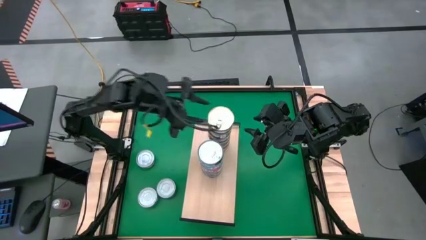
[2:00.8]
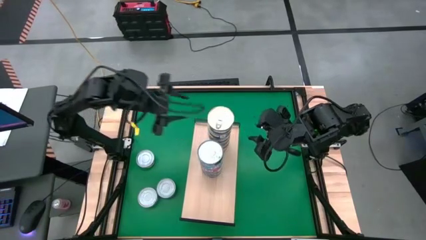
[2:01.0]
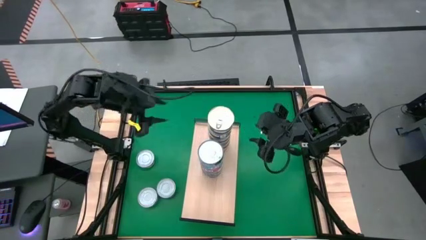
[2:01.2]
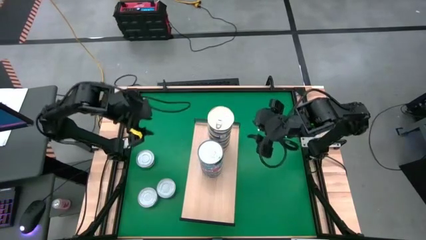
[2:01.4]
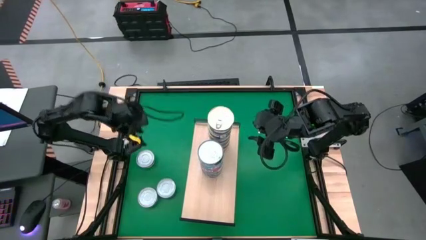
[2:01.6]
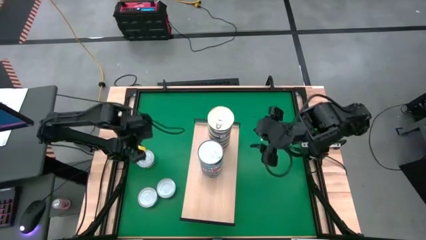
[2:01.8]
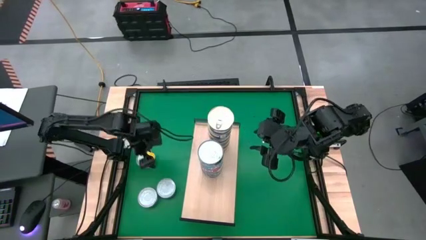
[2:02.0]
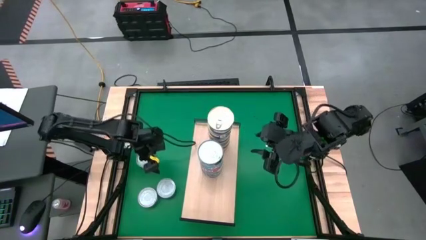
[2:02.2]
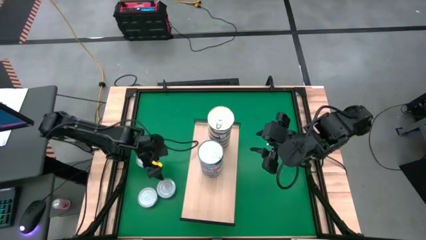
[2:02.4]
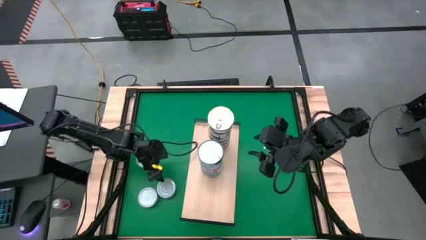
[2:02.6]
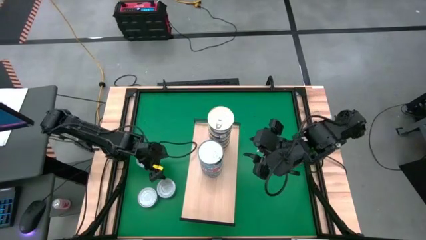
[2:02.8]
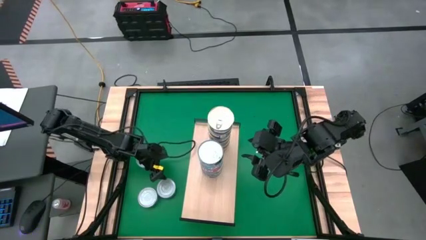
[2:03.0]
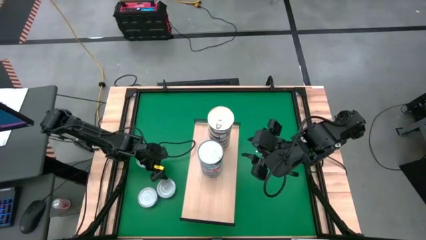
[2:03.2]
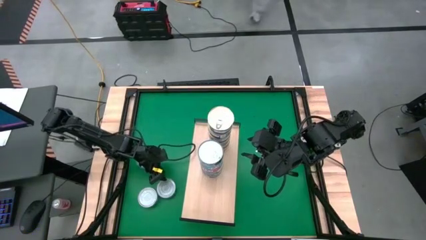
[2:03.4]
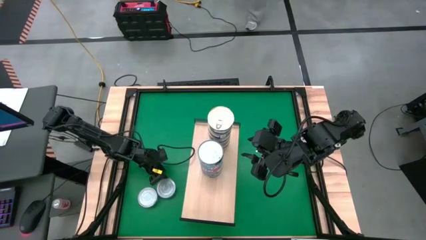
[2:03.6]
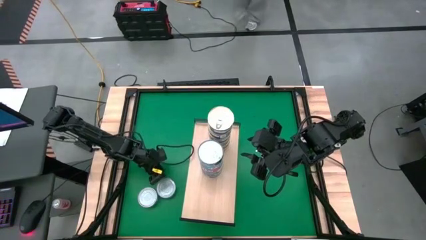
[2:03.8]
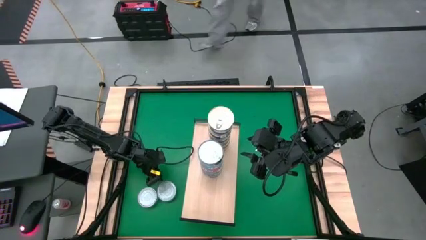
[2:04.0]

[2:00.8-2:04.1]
Task: Stack canned seafood by type on shelf
Put the green white tuna can on the shelf

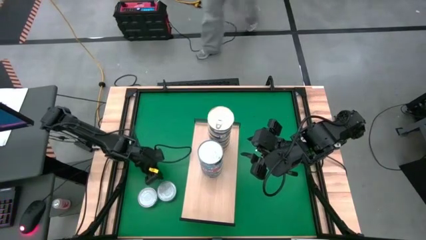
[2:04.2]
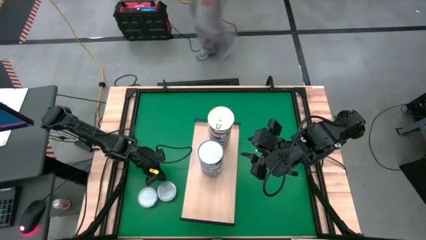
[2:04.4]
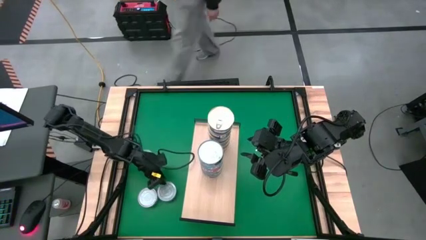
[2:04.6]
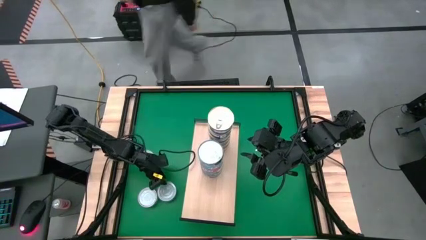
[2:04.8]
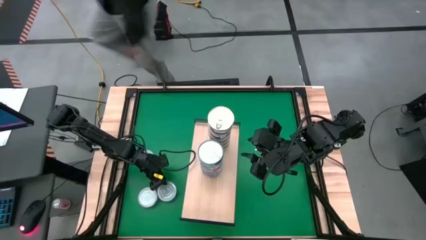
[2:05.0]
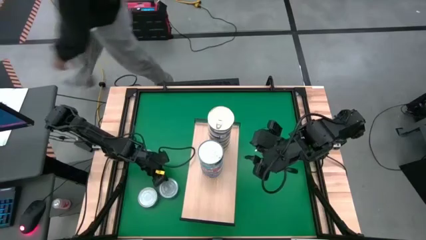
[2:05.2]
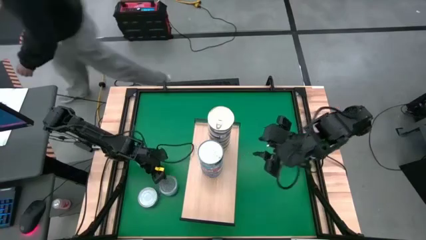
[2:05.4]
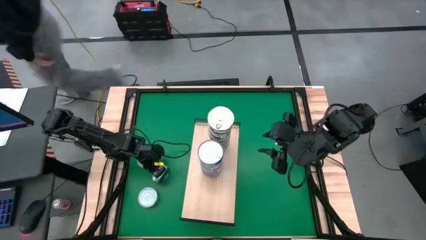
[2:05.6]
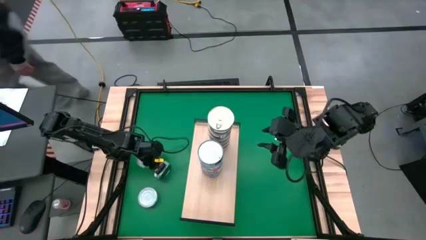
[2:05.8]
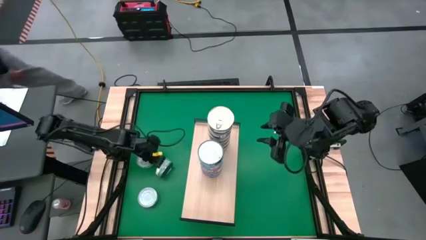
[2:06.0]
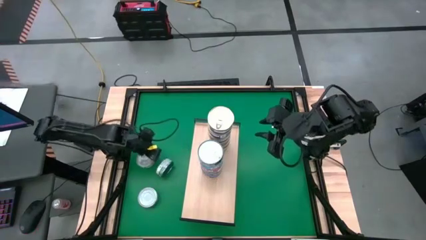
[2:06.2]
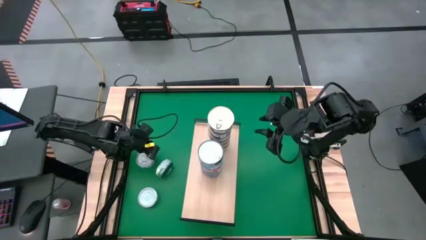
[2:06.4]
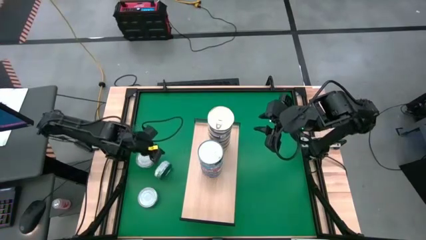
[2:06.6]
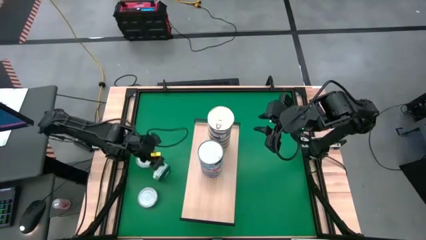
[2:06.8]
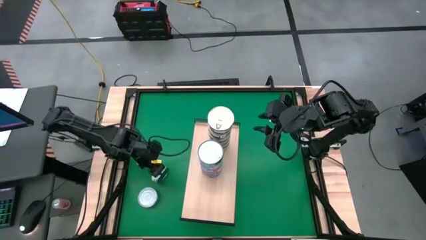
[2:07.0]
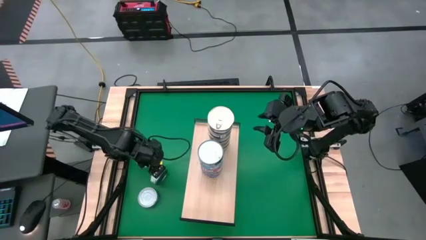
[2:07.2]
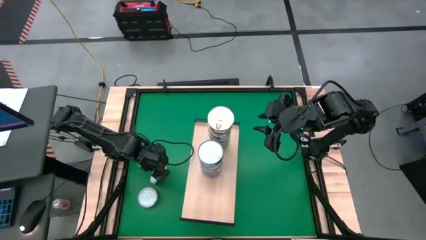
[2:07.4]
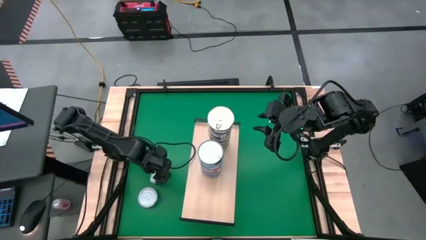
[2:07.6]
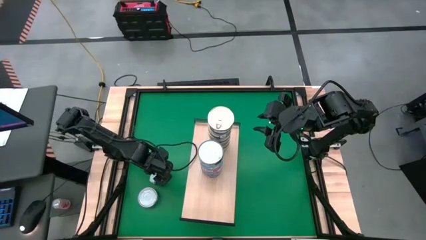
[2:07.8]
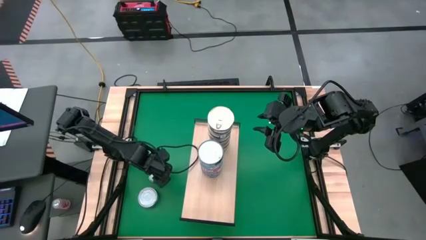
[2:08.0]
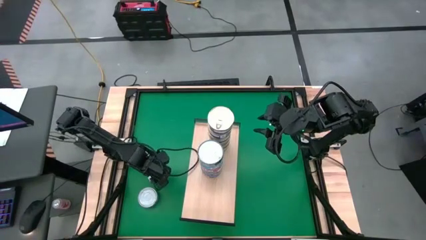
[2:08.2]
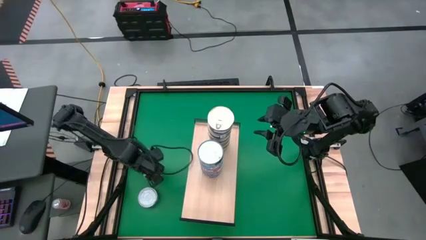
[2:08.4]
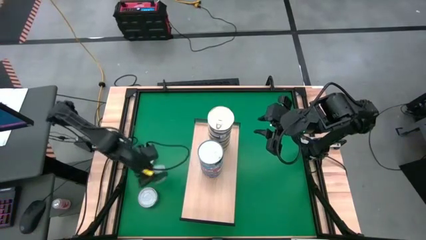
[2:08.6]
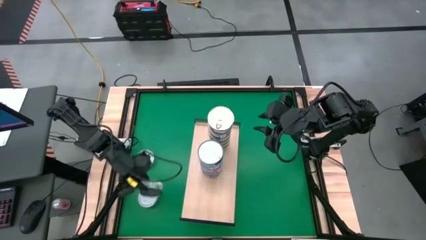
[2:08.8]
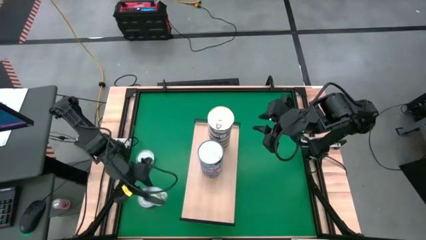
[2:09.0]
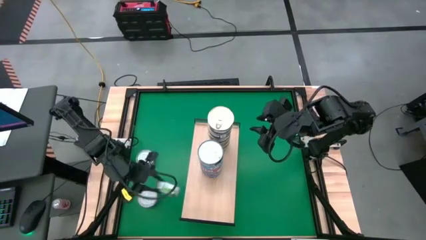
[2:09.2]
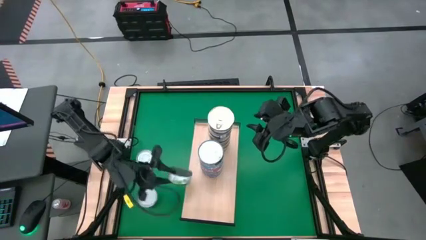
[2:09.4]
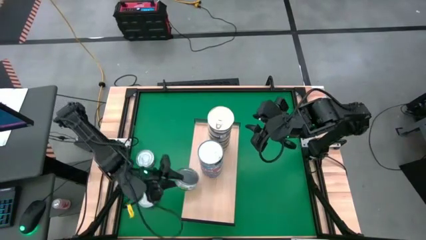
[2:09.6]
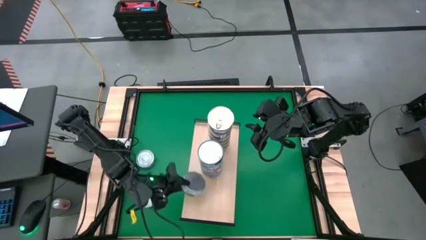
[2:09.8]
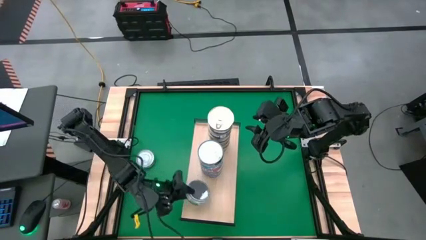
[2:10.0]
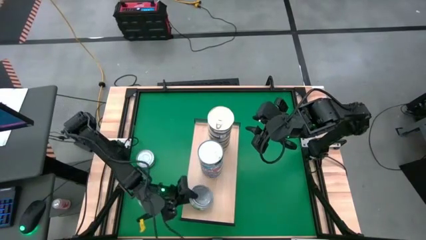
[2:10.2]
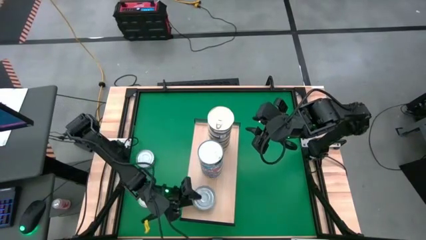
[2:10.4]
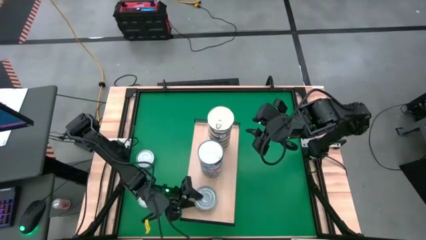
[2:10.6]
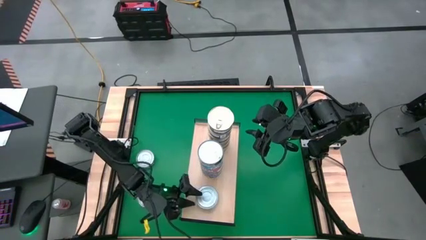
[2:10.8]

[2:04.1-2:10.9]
Put the green white tuna can on the shelf

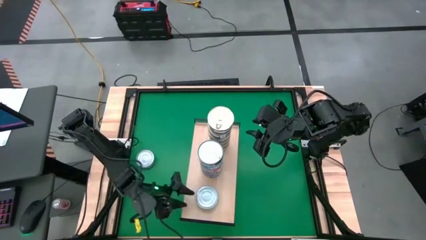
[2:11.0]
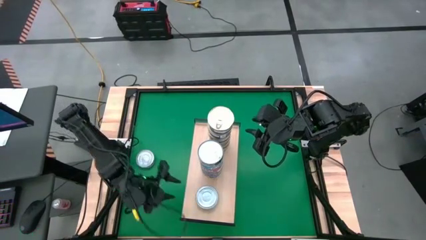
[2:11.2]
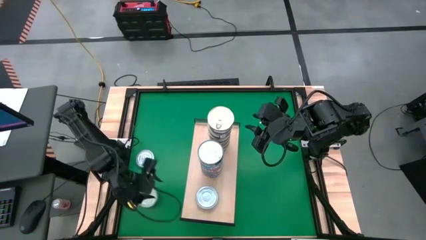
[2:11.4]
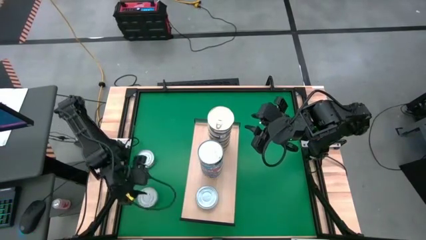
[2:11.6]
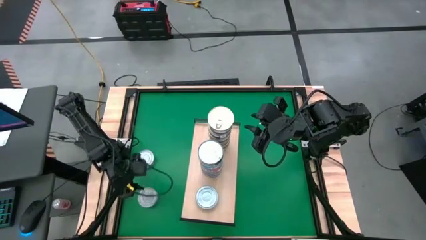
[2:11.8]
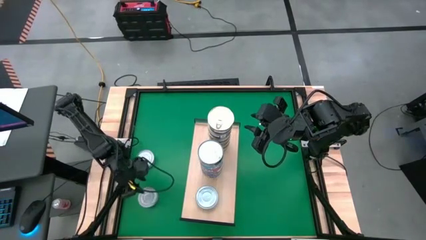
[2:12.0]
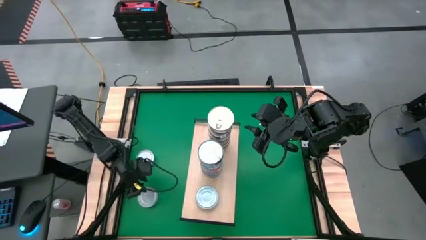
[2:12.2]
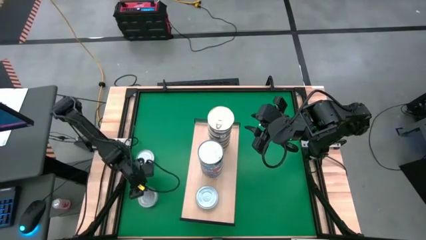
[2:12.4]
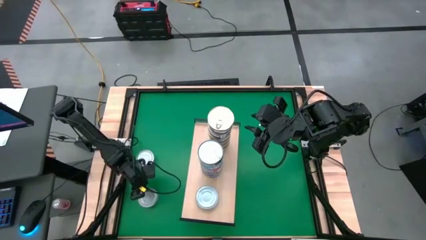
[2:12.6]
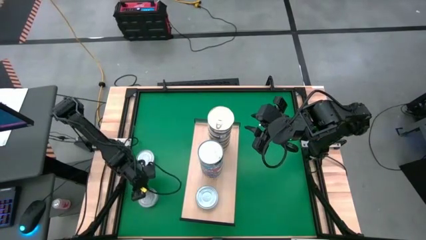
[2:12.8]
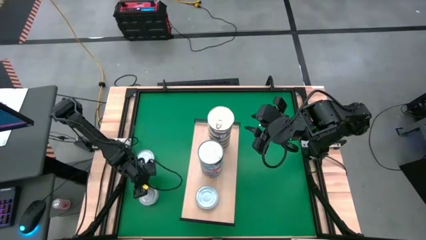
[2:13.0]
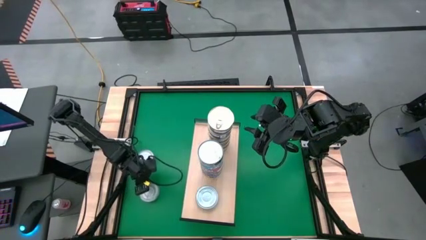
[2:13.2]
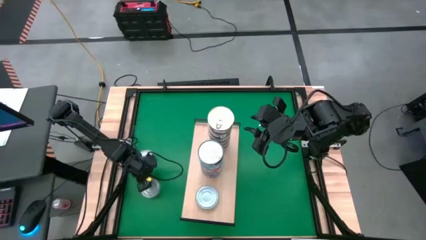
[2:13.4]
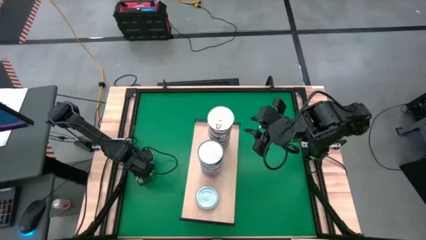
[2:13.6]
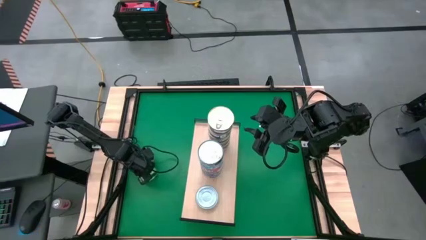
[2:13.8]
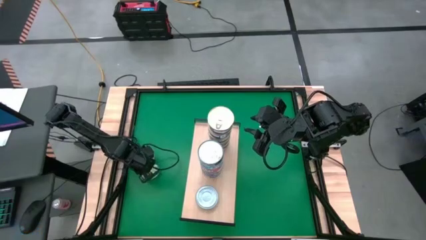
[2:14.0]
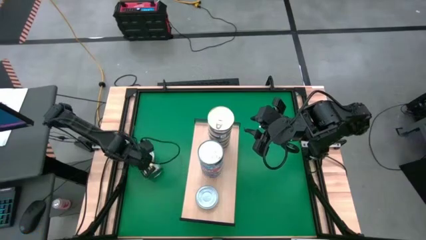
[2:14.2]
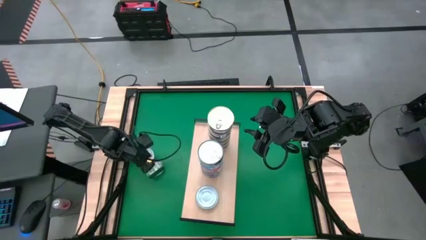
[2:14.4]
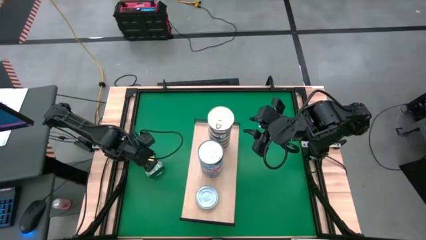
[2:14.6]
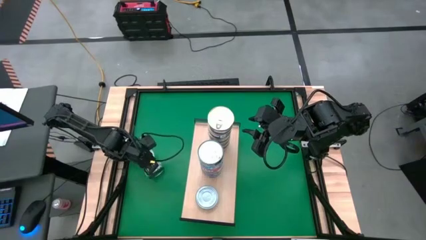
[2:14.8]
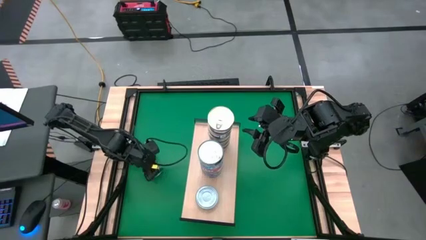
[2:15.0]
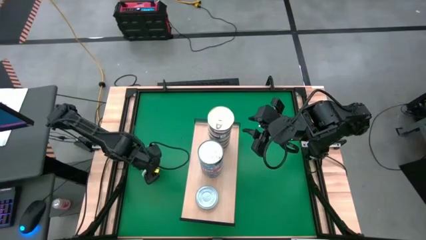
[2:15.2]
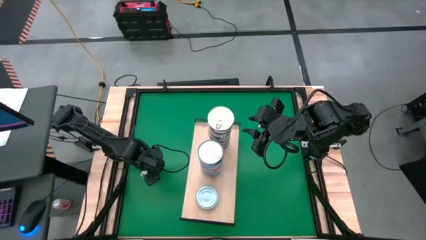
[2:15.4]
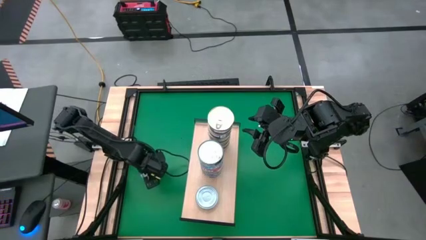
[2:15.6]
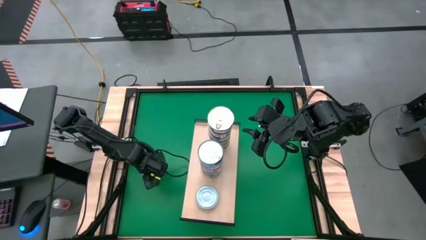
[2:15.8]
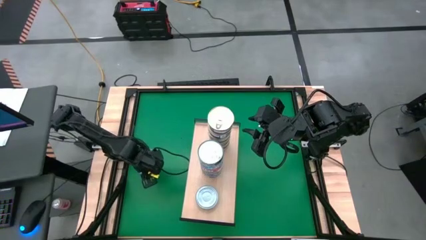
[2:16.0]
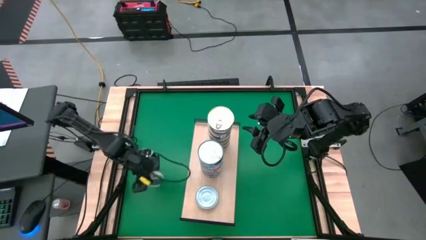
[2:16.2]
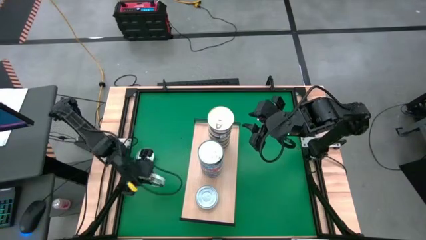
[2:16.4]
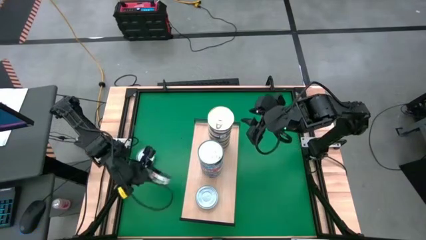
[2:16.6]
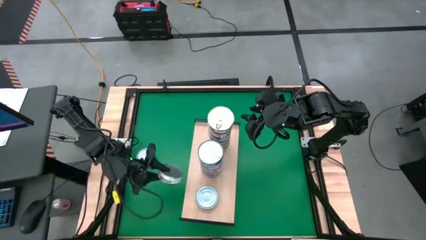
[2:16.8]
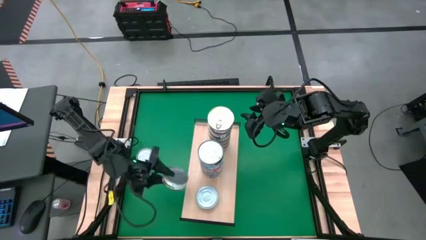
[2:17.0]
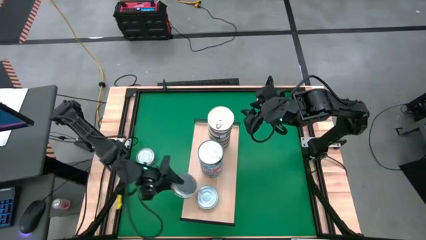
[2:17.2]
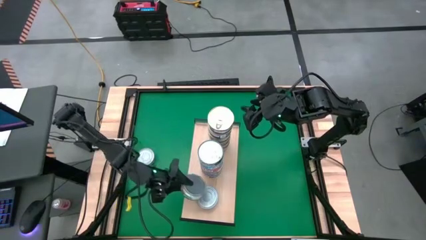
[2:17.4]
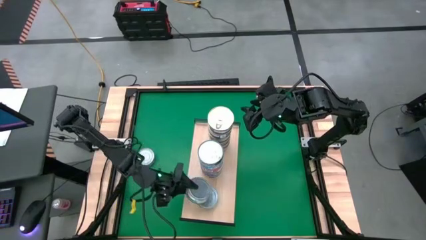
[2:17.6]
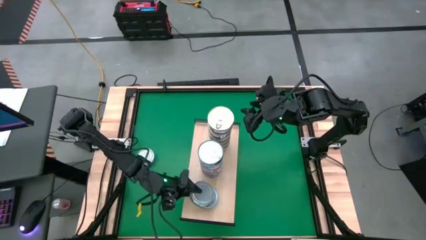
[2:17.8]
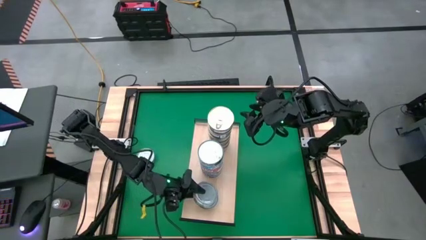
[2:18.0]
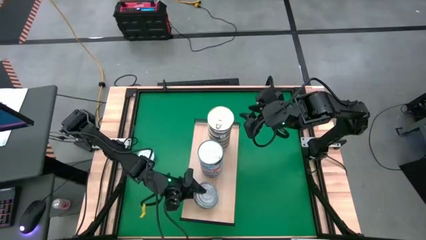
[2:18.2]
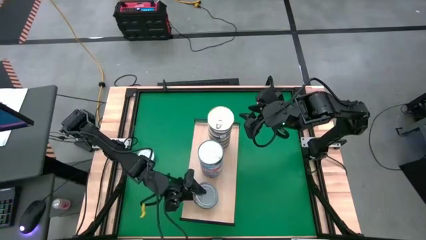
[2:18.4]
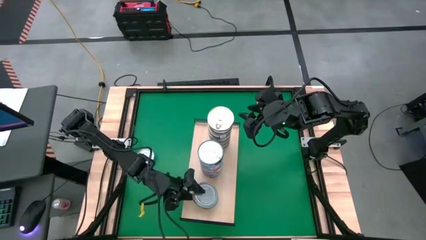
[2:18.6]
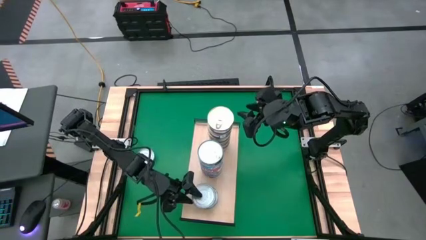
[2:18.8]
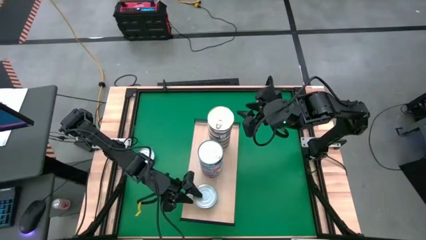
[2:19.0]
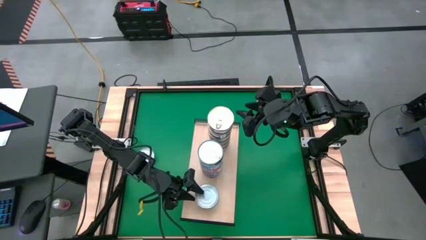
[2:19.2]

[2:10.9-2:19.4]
Stack the green white tuna can on top of the other green white tuna can on the shelf
